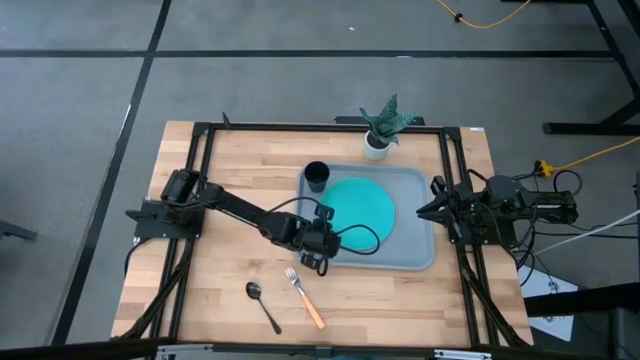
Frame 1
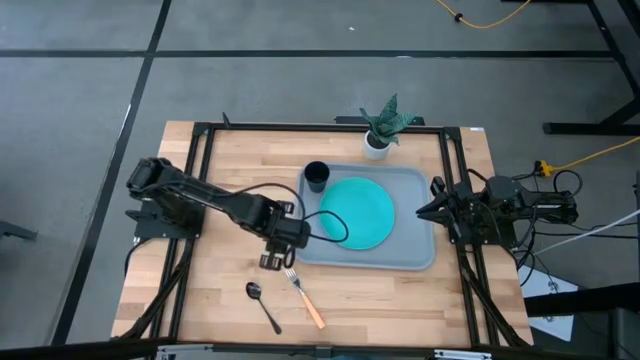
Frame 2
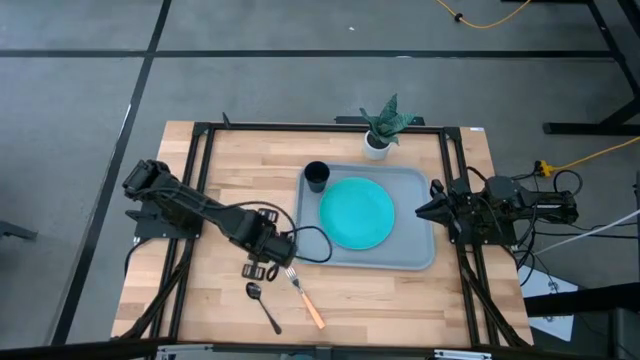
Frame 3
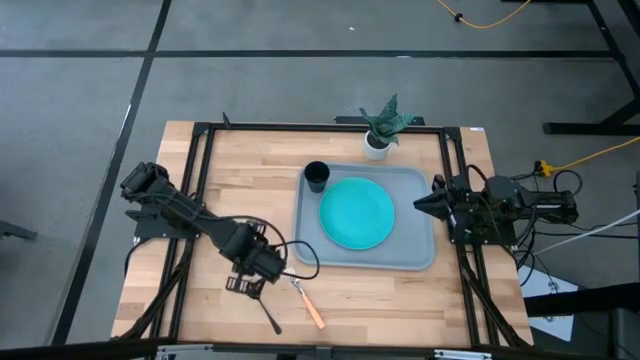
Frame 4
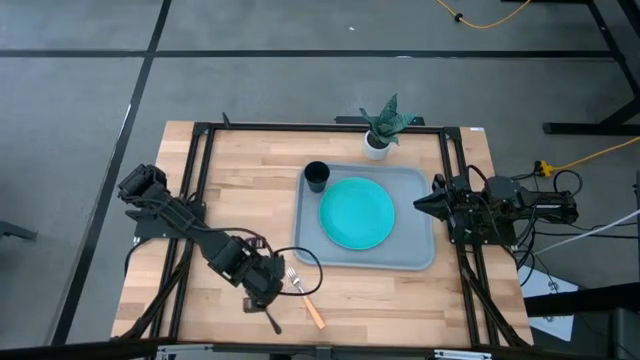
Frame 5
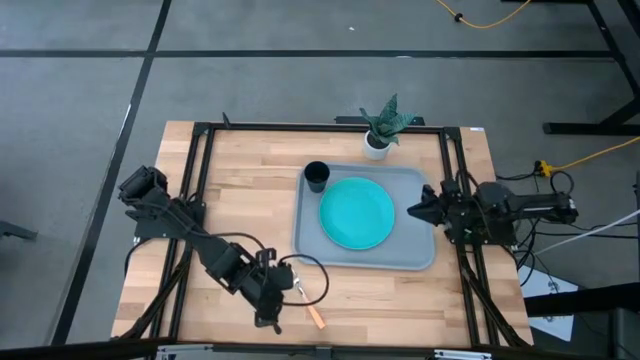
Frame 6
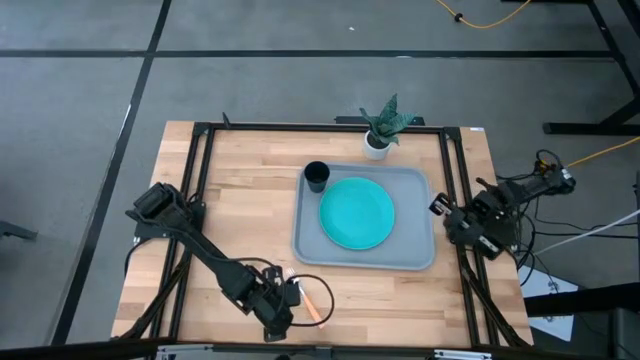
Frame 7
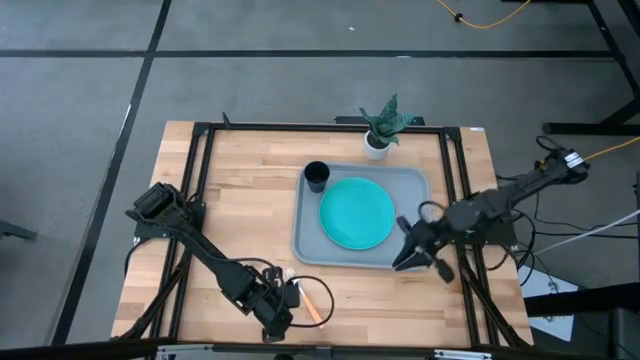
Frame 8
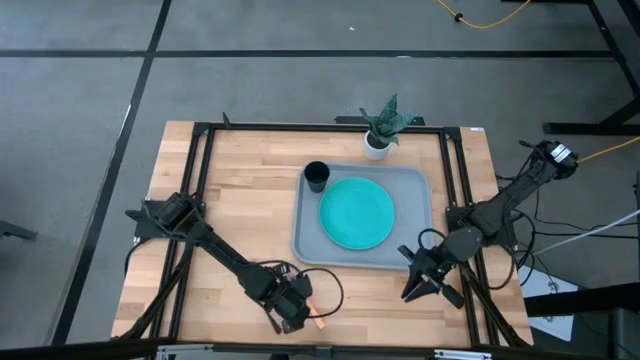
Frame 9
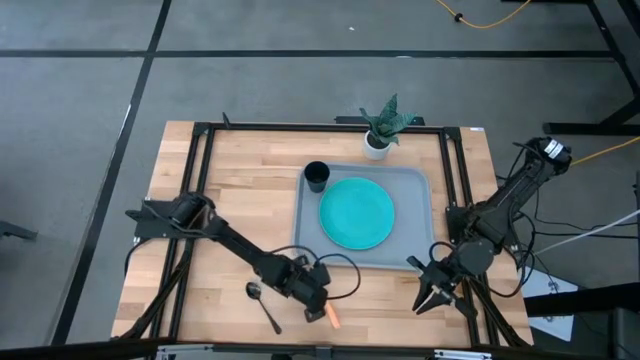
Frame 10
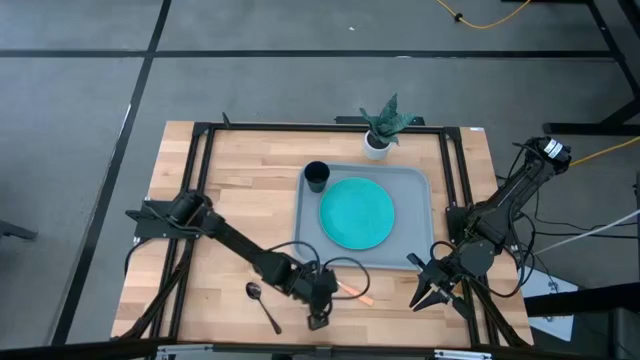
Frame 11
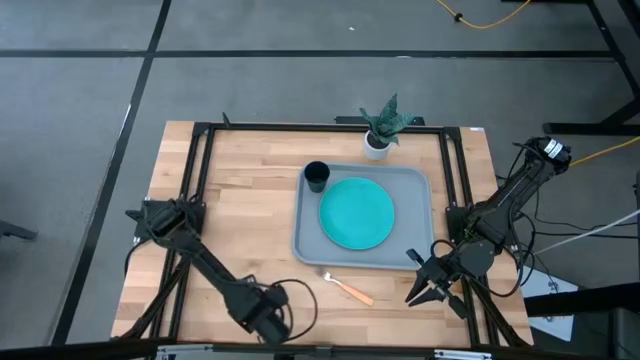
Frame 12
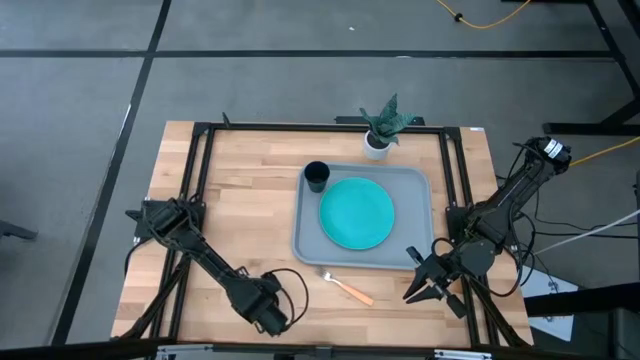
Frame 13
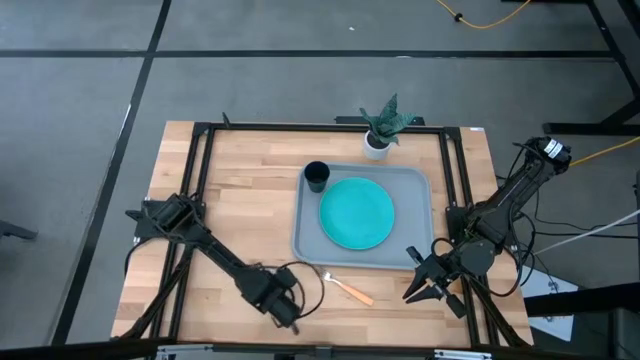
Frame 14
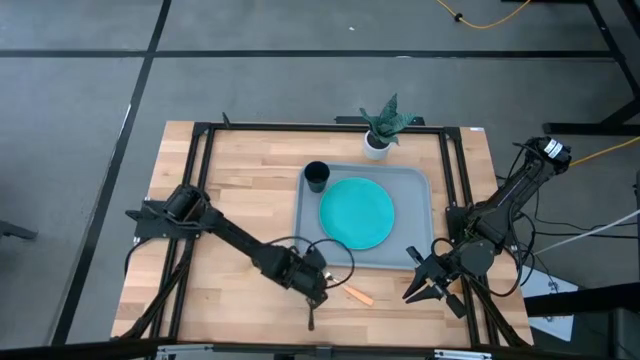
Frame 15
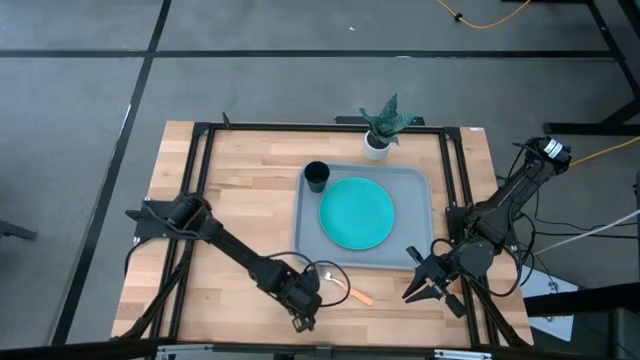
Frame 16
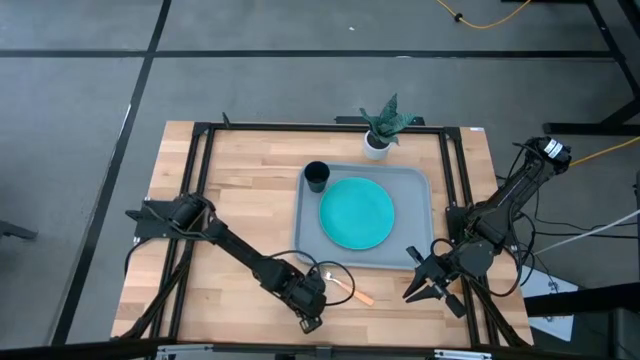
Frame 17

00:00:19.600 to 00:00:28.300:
Task: Pick and place plate/cup/fork/spoon on tray
Prepare the silverwares on the table

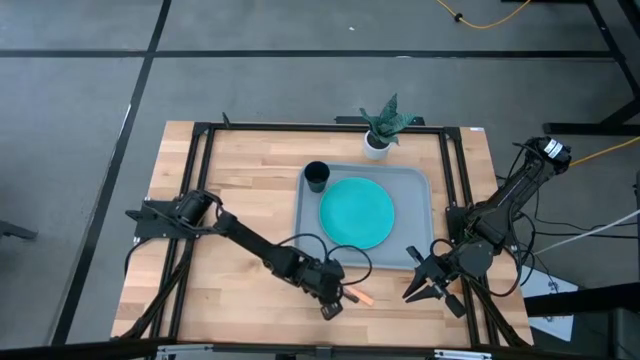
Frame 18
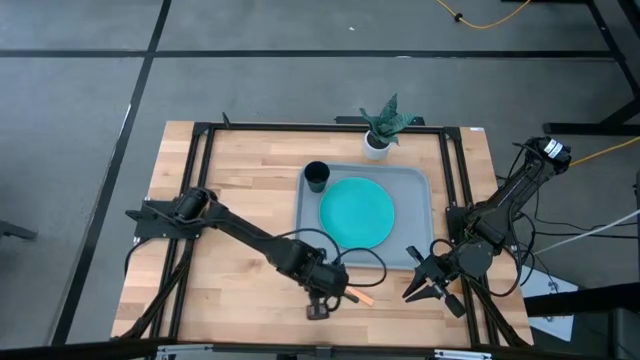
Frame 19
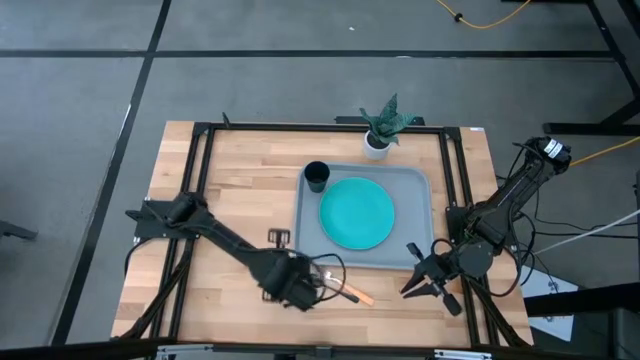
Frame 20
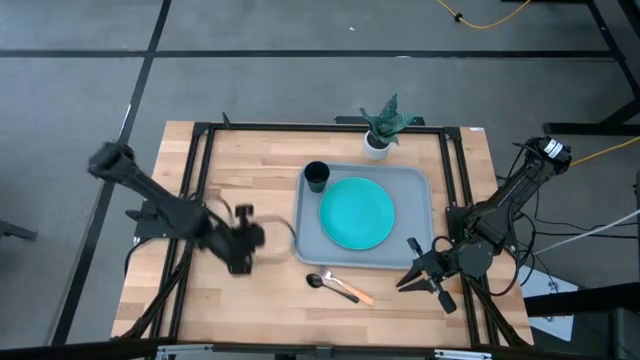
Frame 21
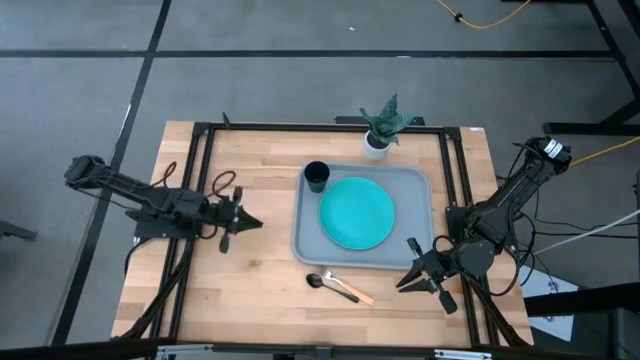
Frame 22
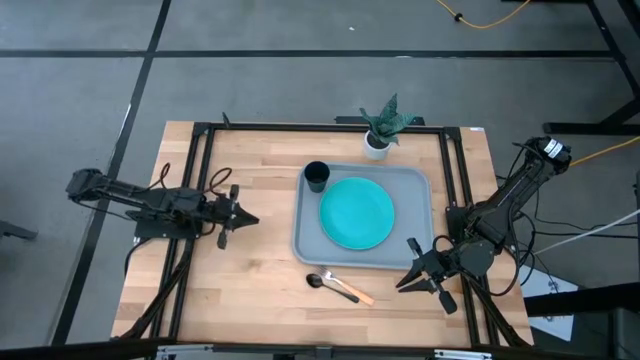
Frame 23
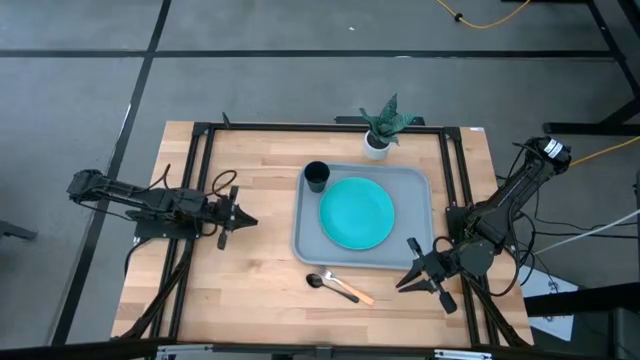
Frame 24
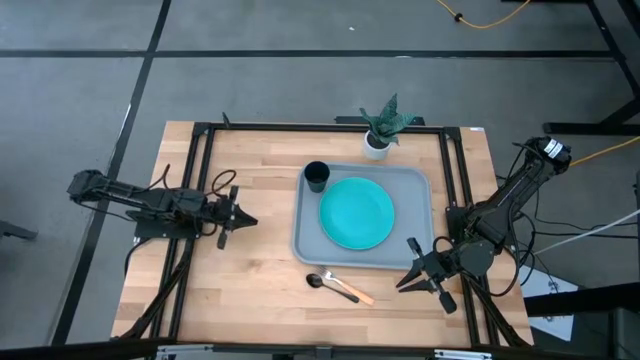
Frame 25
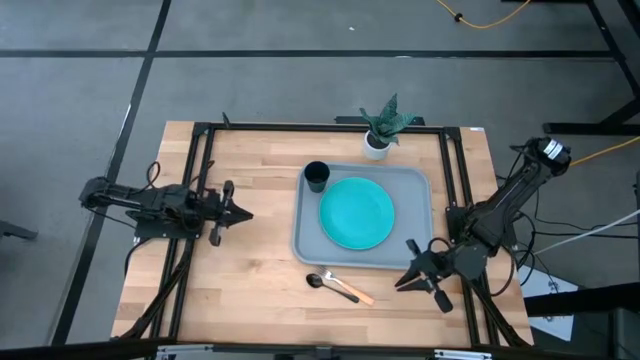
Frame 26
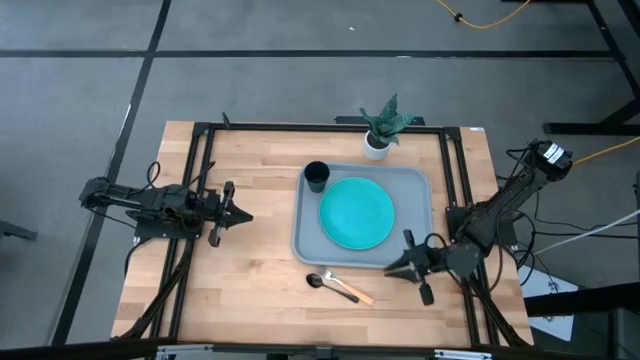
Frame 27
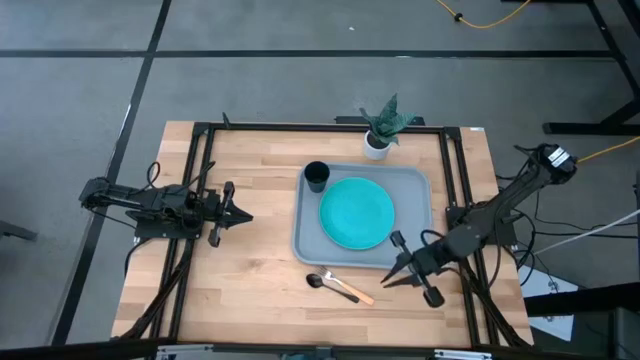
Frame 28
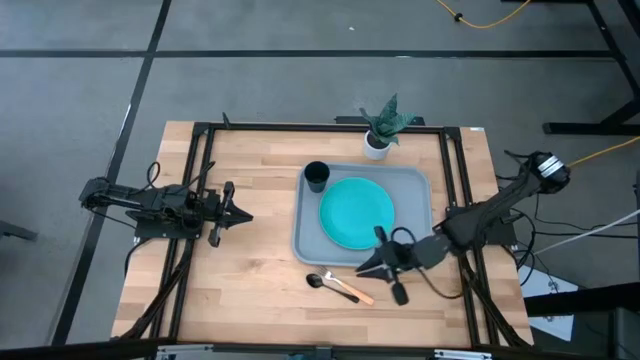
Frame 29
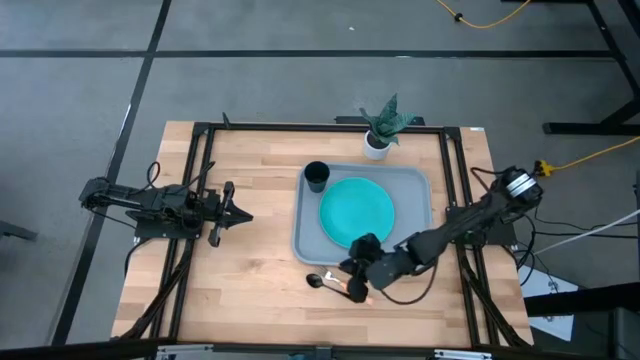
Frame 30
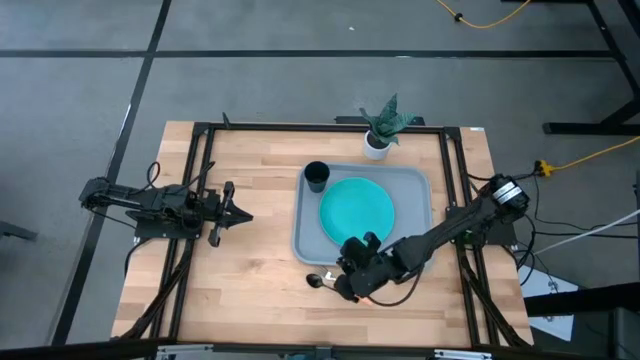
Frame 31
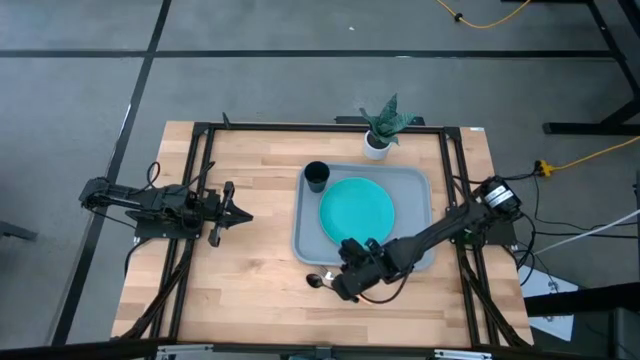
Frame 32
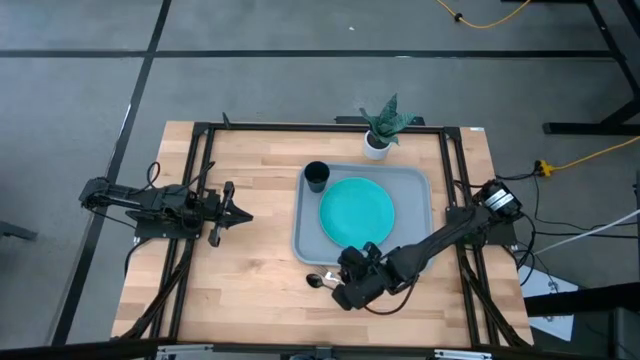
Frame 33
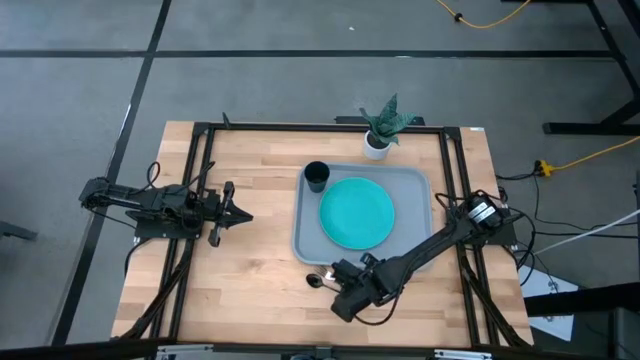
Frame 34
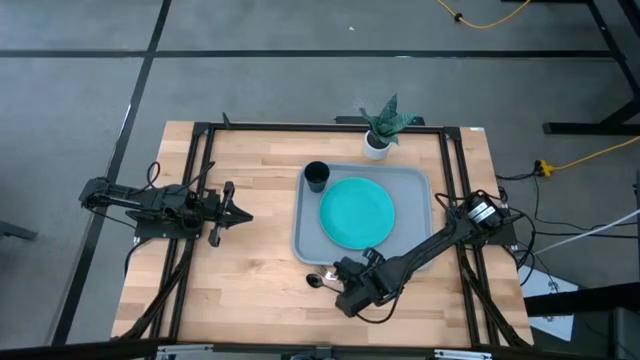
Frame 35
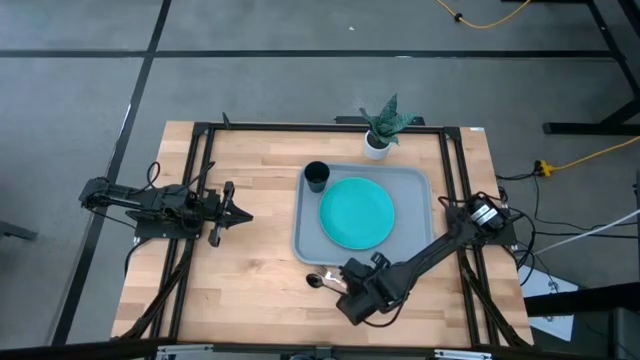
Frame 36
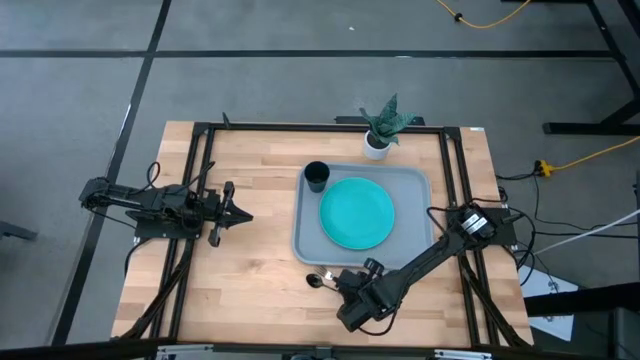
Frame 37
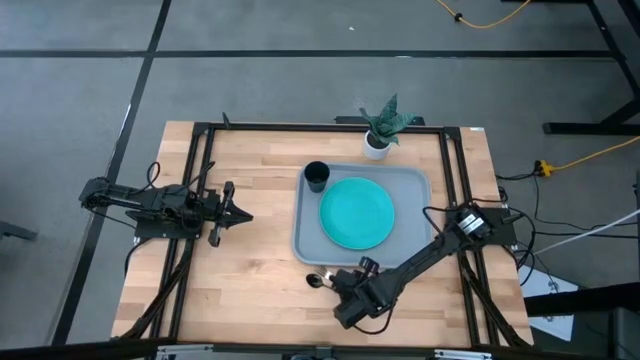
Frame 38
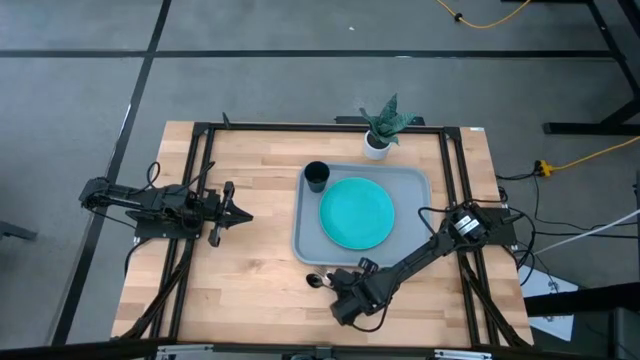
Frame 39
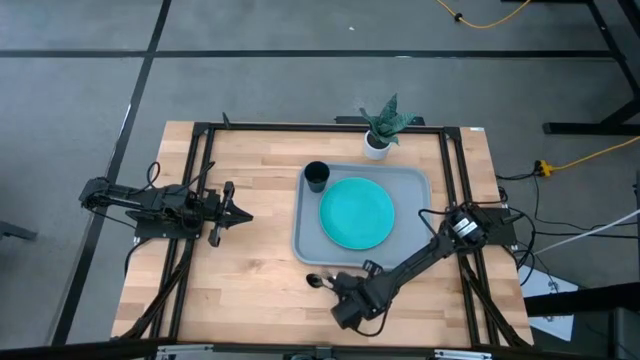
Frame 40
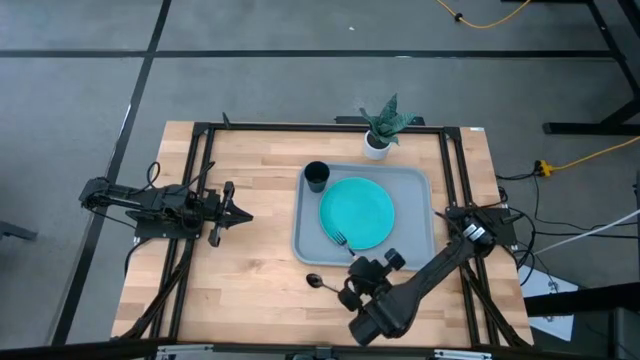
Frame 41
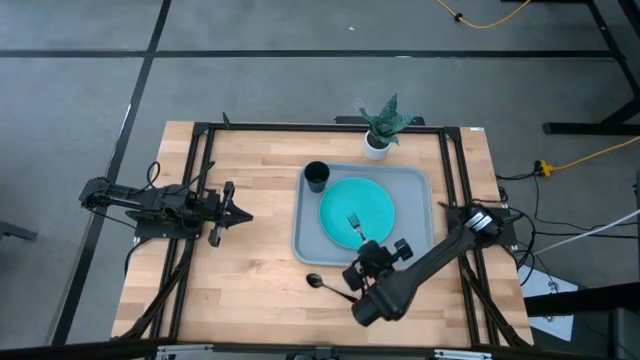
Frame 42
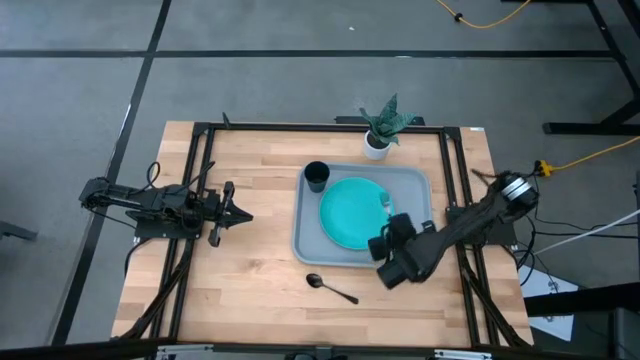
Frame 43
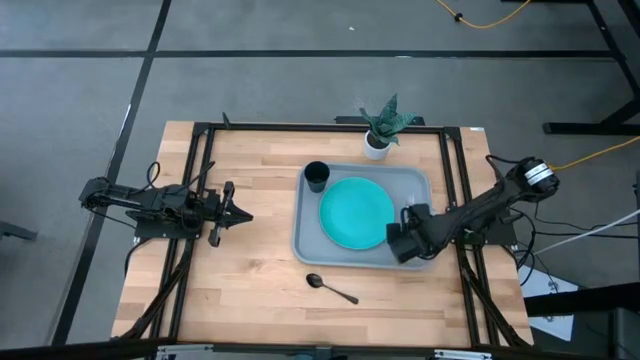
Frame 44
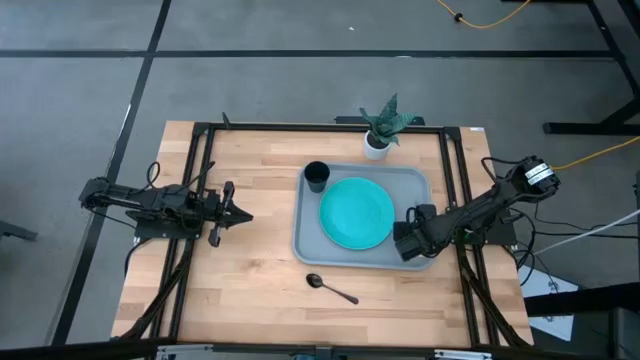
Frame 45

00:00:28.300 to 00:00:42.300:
Put the orange fork on the grey tray to the right of the blue plate
